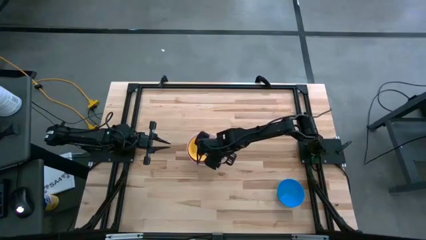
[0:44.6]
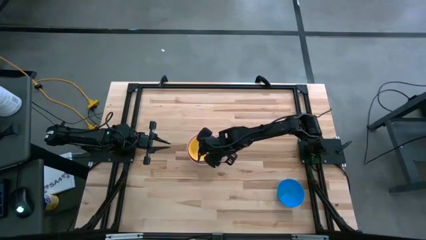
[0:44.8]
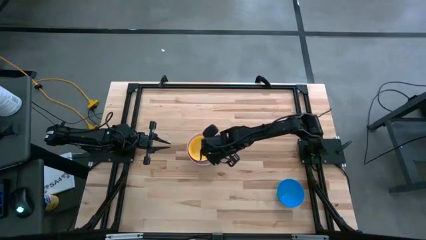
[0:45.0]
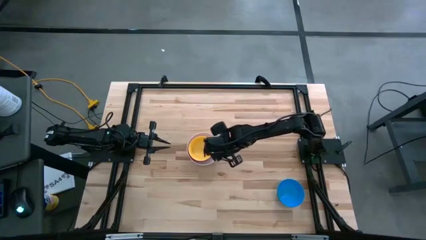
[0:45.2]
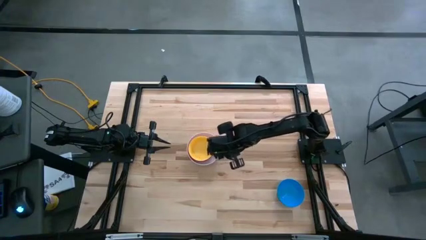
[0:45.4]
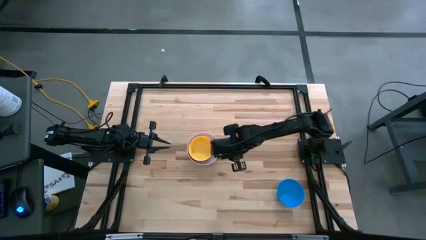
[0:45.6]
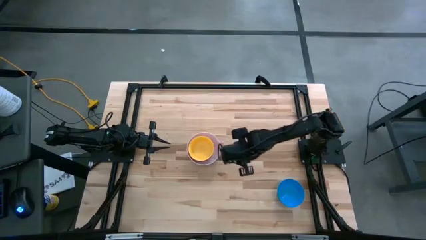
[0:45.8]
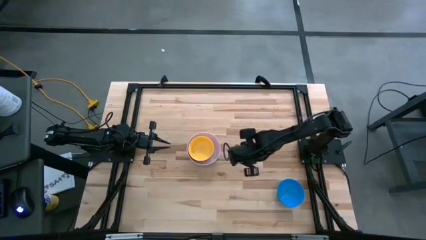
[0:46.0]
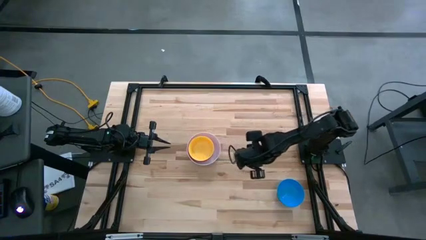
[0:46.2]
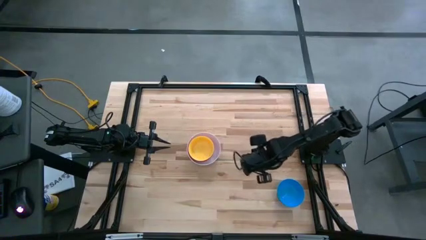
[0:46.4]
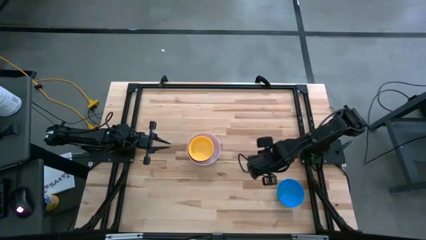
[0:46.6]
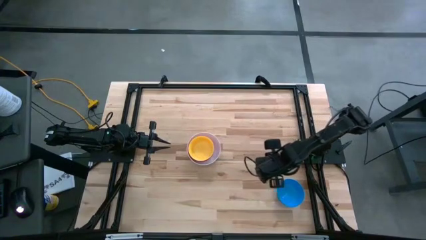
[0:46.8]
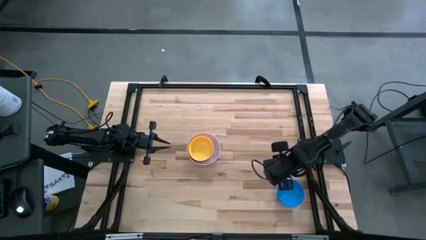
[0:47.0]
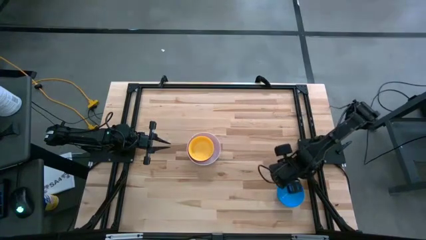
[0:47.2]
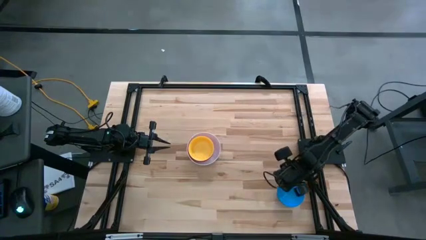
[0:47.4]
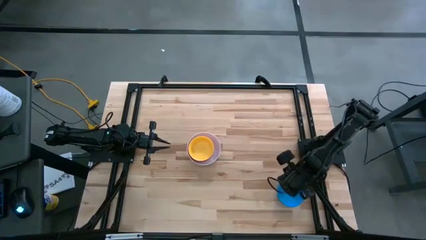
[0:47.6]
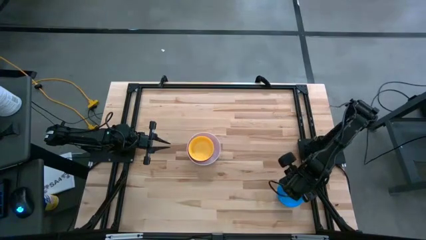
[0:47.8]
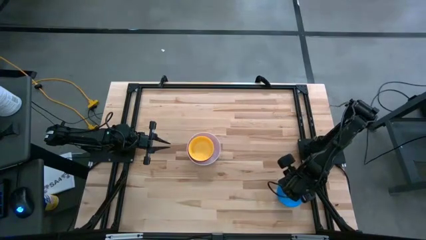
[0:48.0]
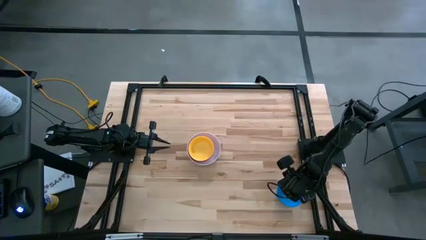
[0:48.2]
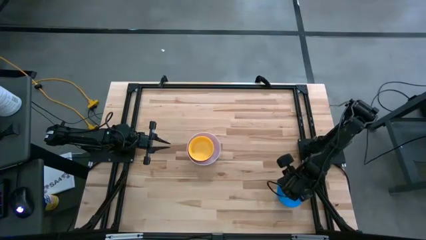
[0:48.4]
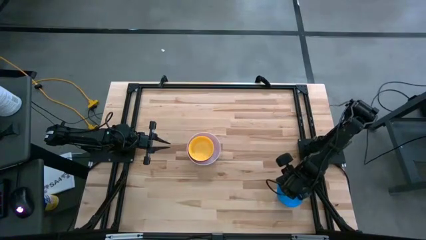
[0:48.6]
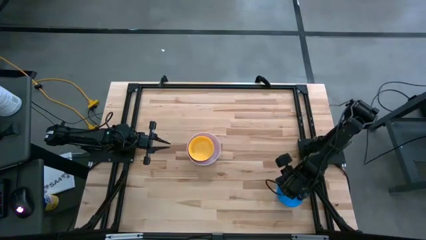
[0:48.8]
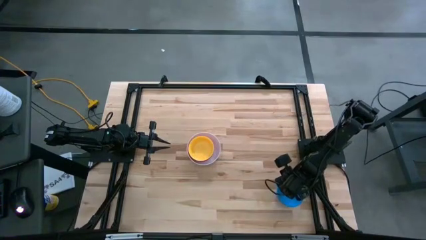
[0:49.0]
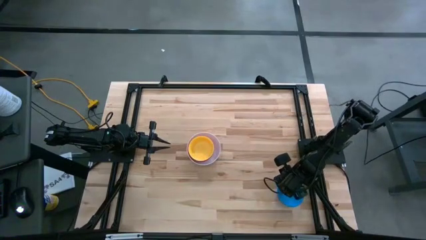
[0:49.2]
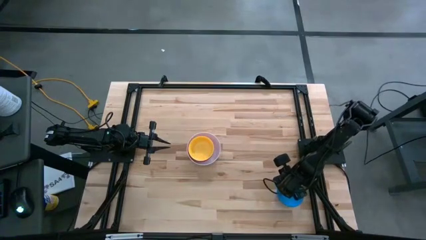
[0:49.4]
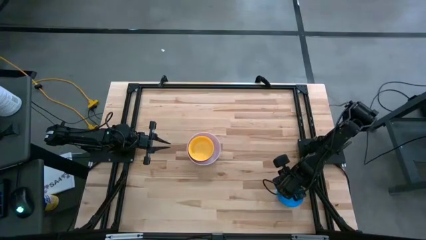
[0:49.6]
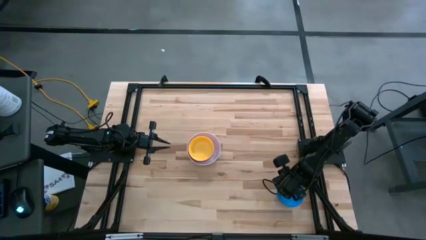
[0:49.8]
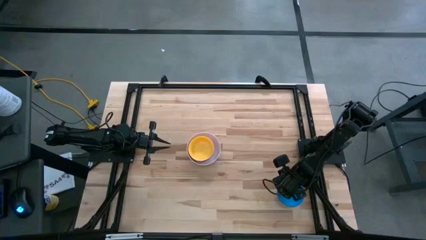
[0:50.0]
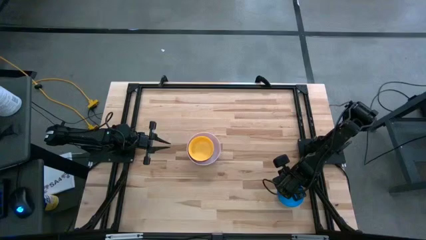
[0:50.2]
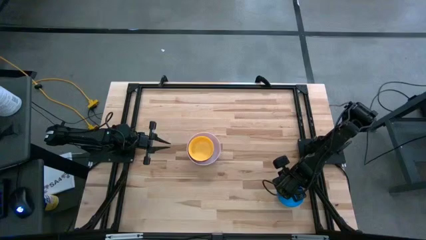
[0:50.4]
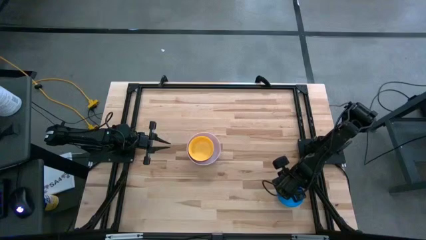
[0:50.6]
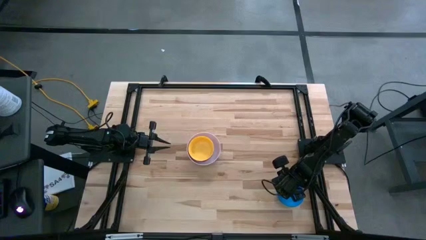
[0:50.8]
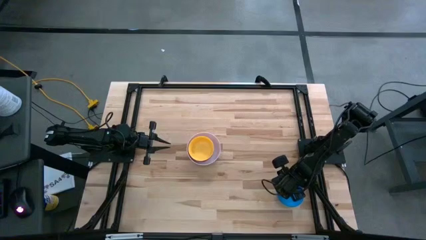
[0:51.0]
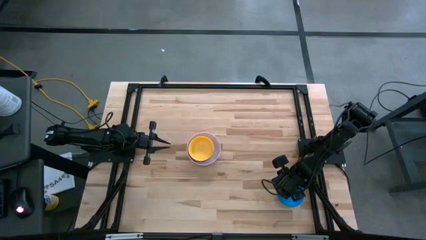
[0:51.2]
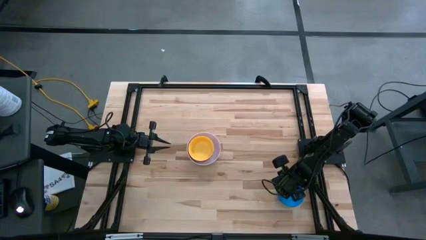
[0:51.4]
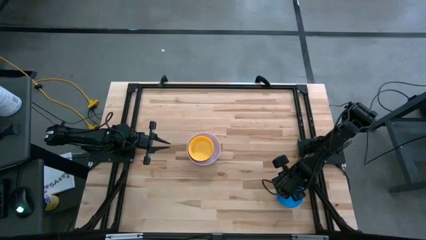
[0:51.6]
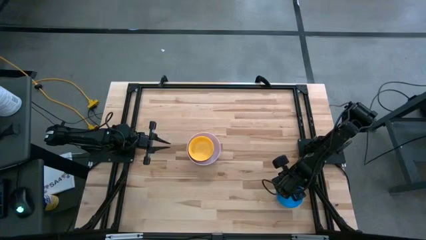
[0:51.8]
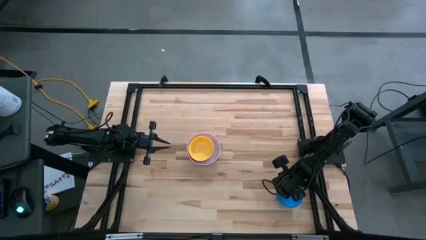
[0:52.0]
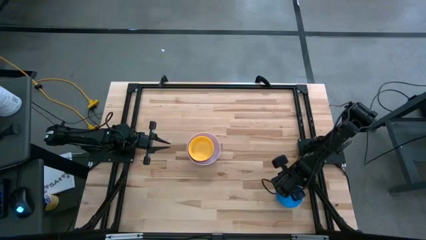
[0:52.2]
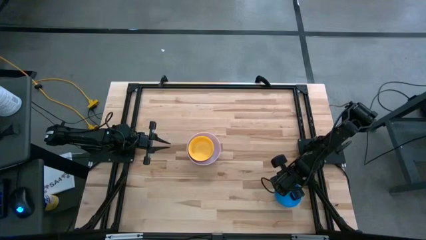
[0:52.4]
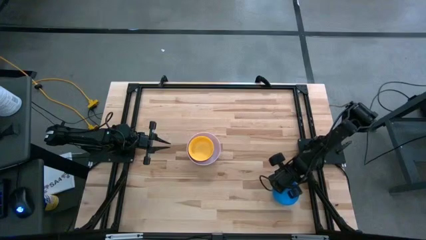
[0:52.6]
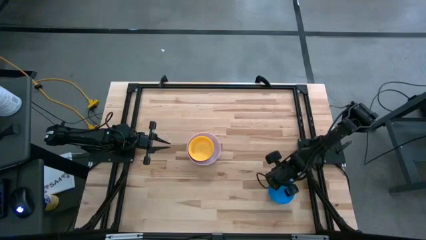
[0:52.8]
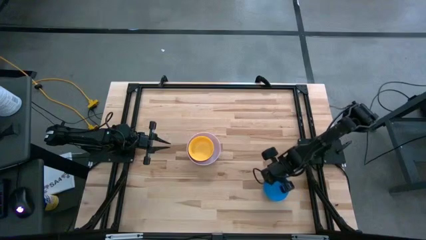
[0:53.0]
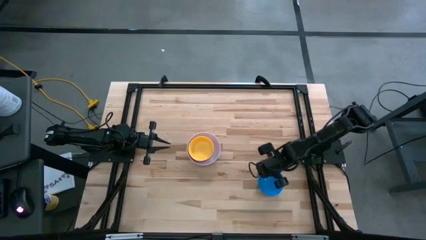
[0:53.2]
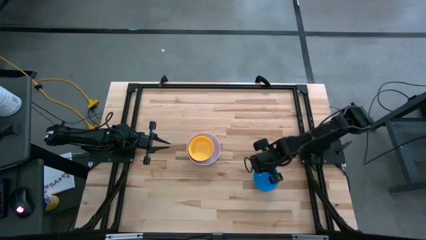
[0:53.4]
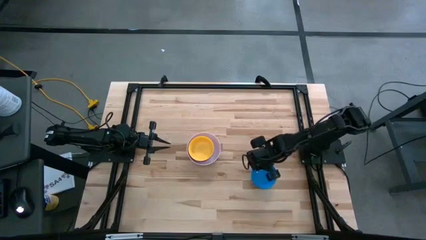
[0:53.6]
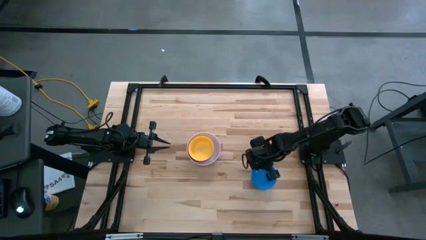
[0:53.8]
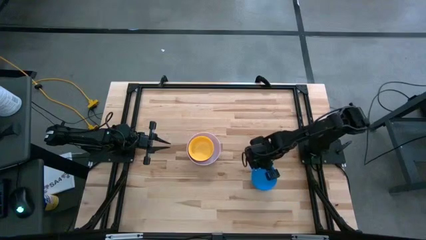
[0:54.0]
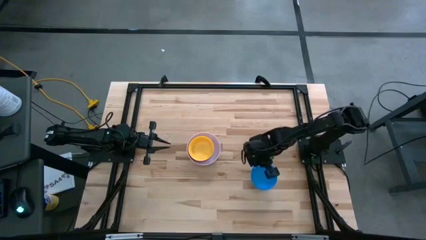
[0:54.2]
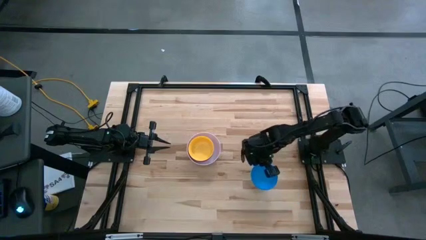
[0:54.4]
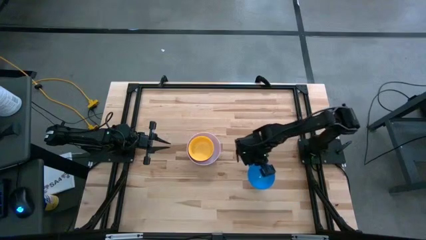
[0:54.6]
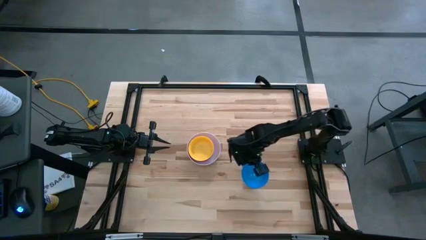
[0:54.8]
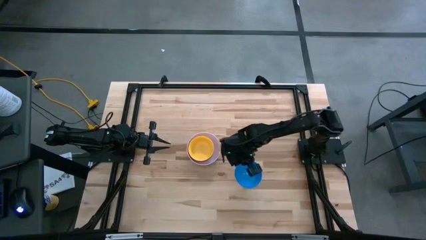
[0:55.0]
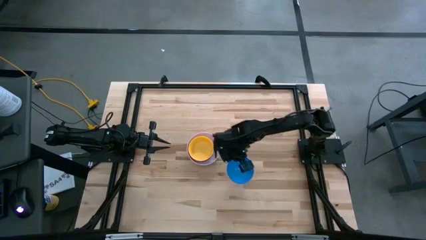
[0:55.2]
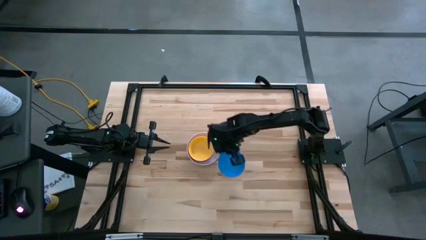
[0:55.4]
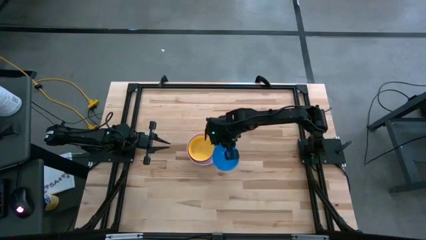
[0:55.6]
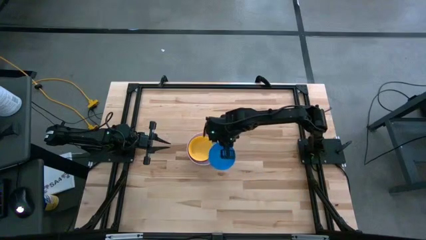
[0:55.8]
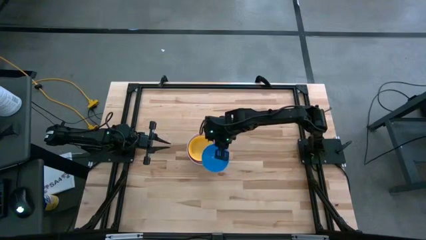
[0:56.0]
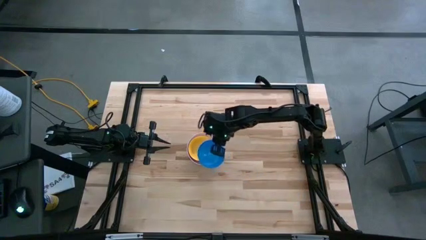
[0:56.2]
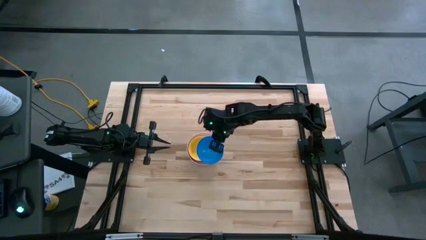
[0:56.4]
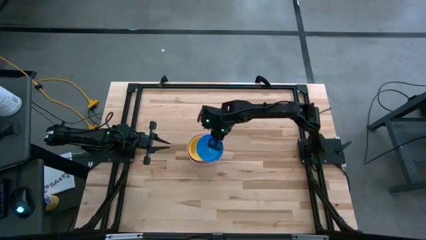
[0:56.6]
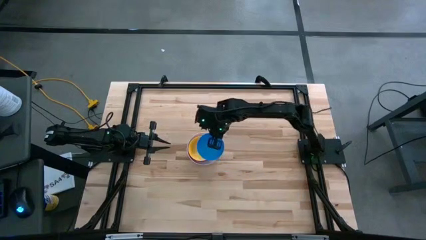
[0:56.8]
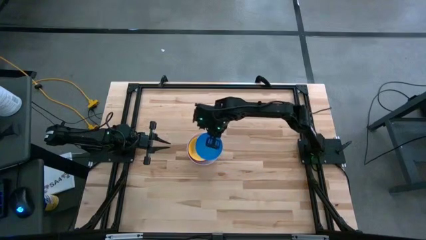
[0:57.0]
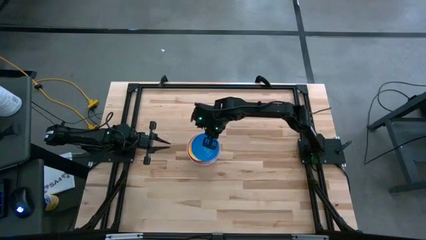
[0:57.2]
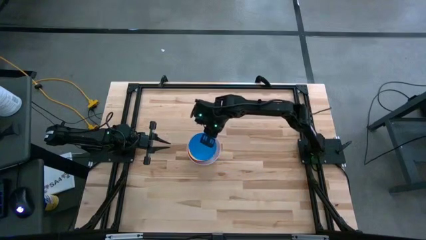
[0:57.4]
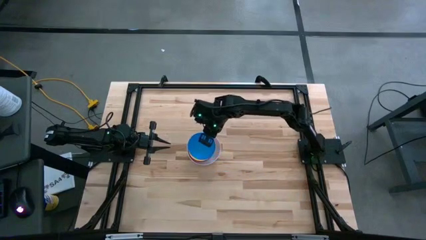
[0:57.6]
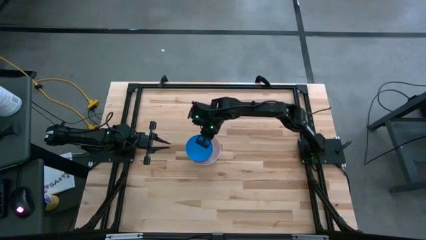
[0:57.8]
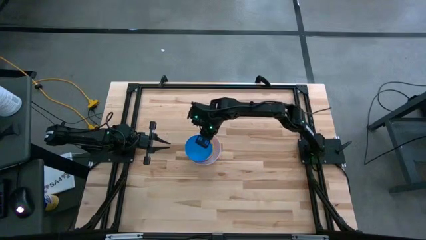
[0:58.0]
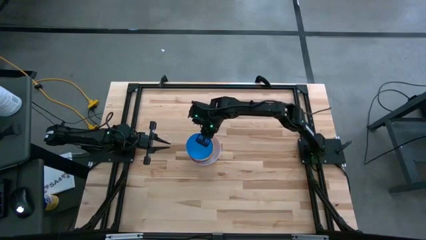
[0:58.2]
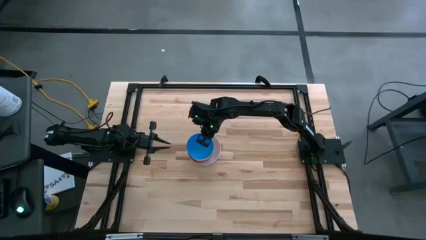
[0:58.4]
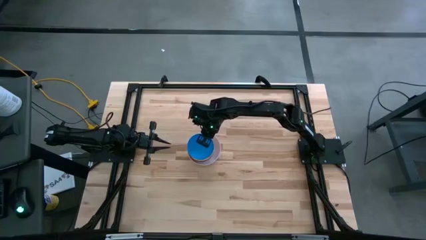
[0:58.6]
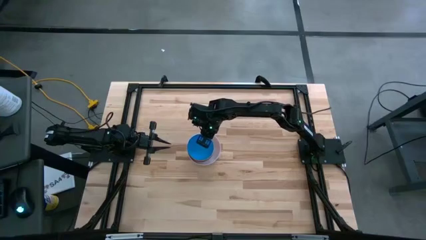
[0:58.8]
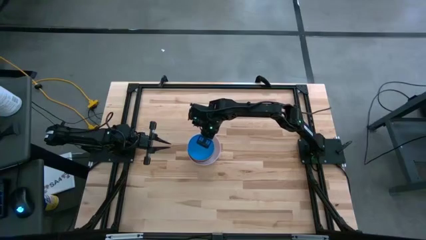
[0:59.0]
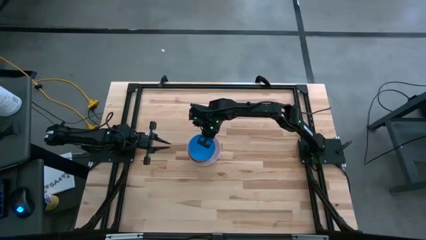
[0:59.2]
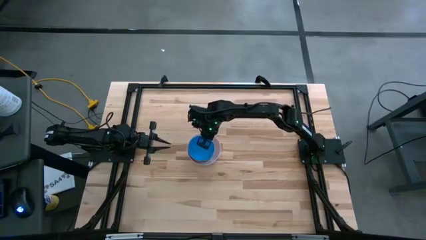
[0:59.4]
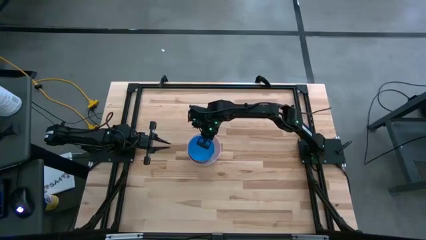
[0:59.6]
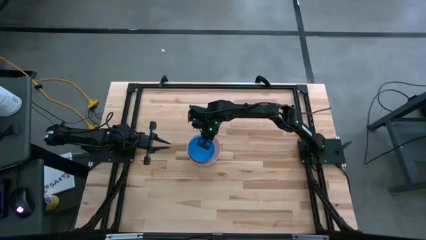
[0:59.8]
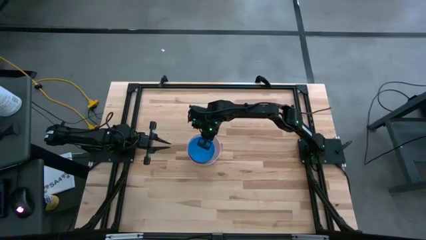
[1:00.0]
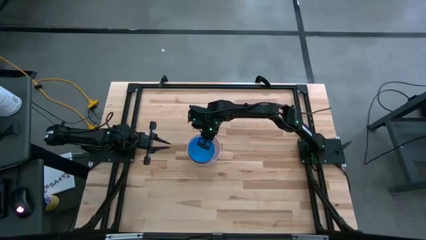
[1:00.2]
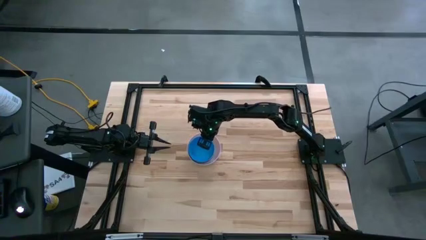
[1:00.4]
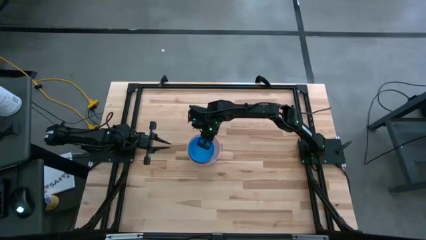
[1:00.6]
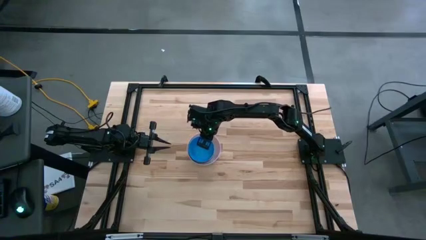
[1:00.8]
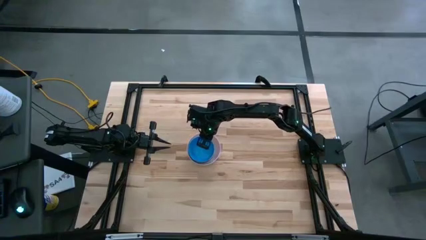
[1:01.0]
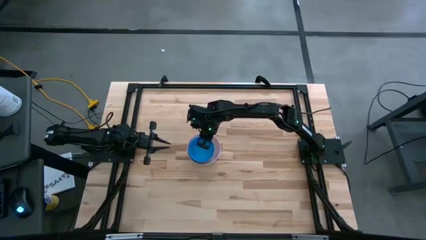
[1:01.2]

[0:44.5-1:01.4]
Stack the blue bowl on the yellow bowl
